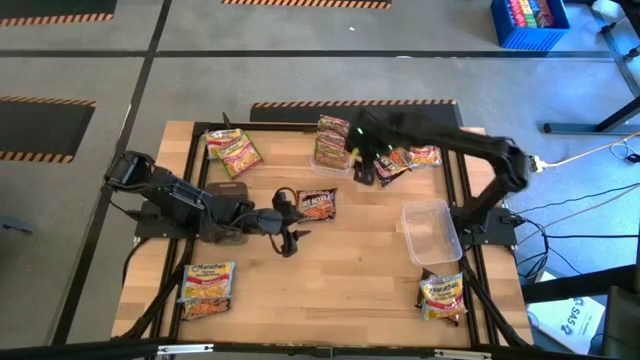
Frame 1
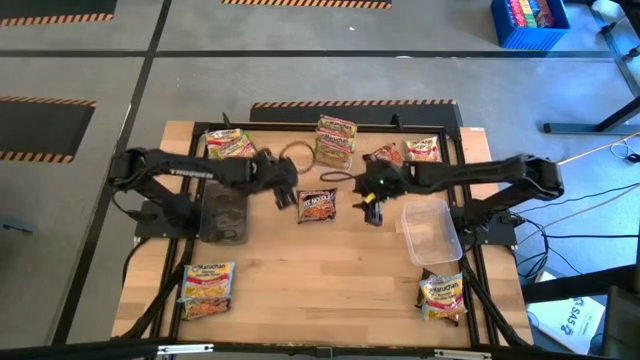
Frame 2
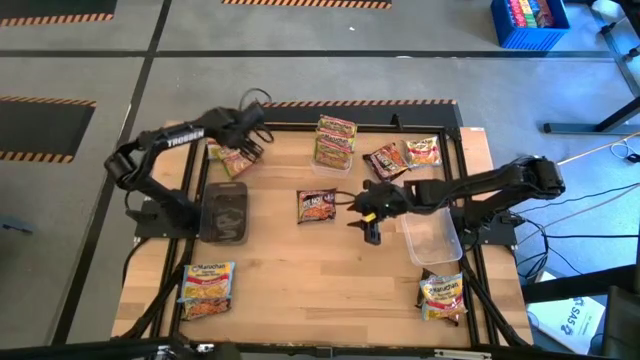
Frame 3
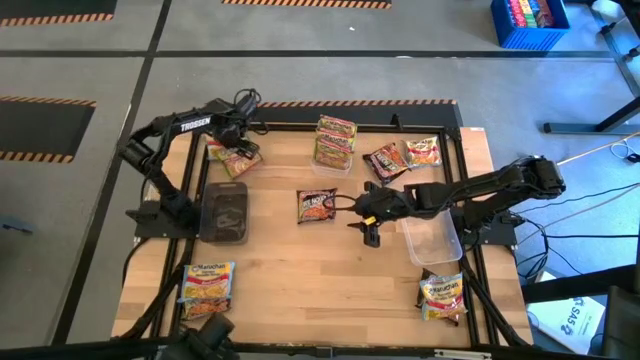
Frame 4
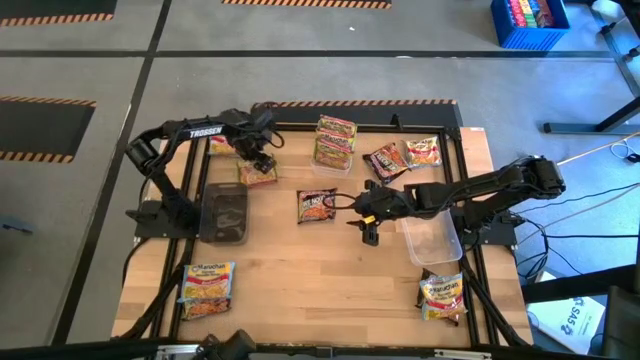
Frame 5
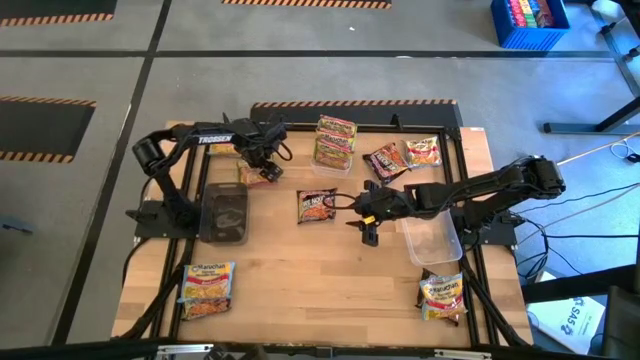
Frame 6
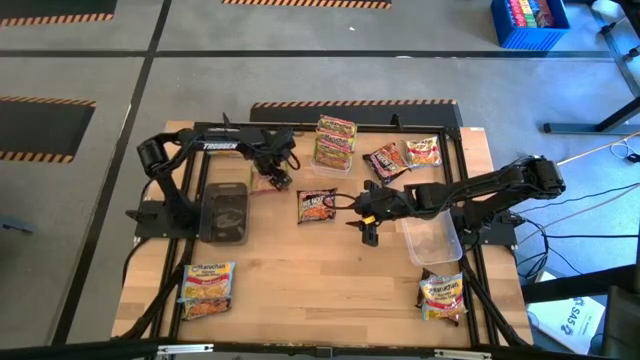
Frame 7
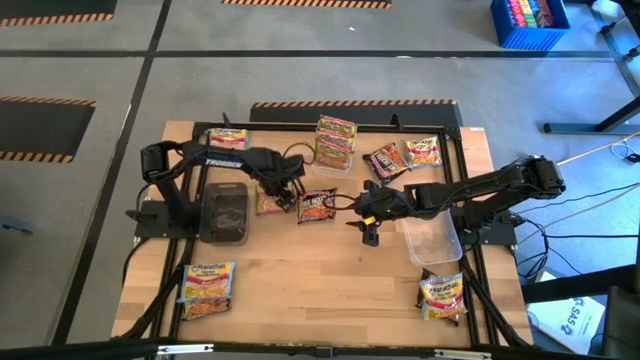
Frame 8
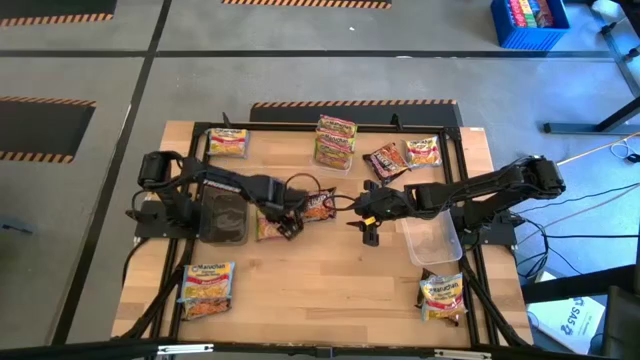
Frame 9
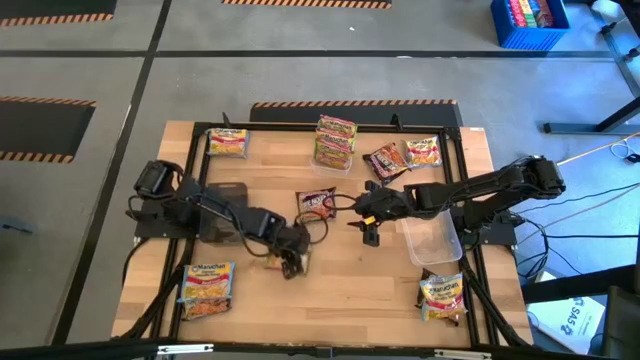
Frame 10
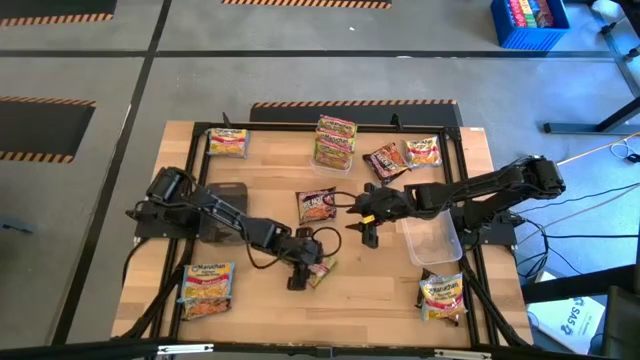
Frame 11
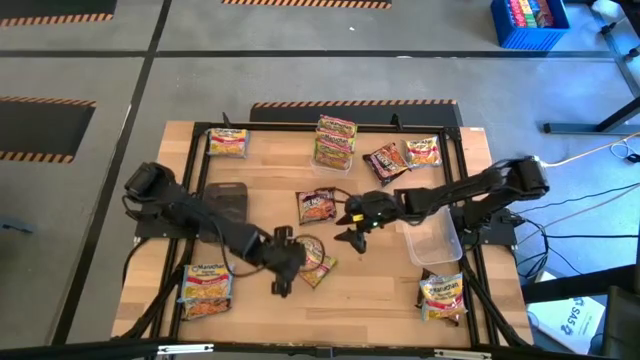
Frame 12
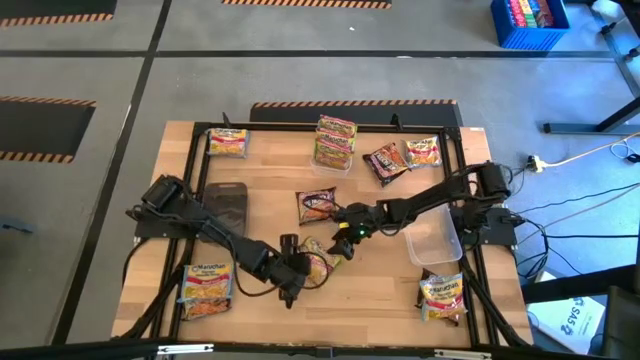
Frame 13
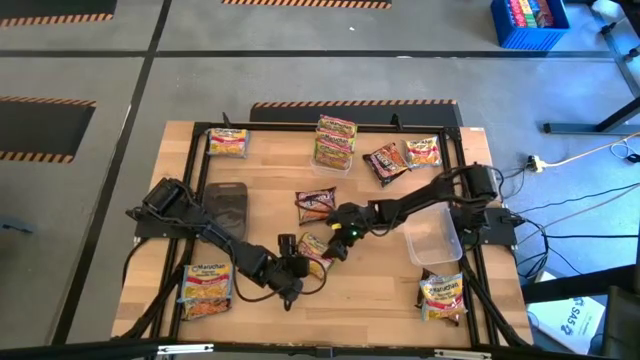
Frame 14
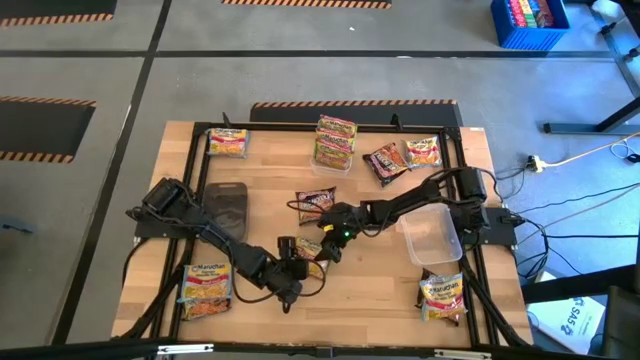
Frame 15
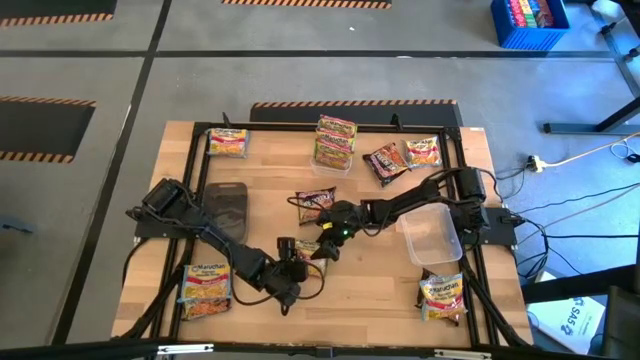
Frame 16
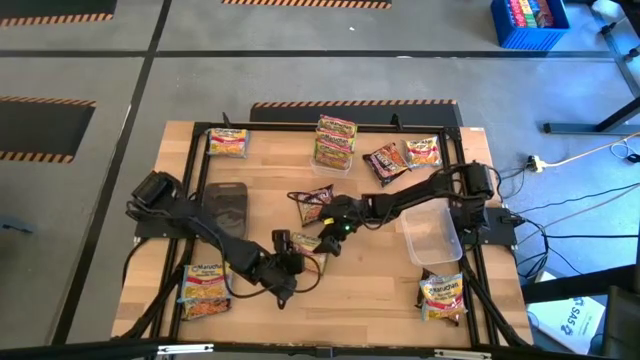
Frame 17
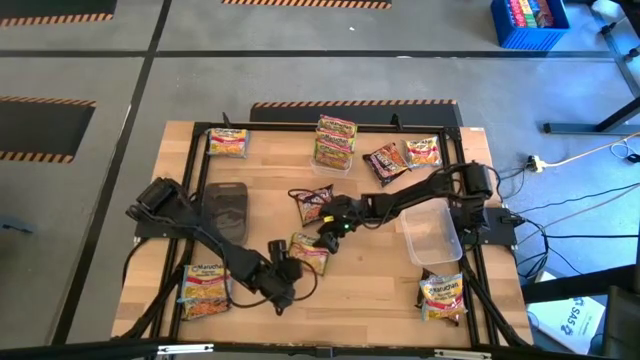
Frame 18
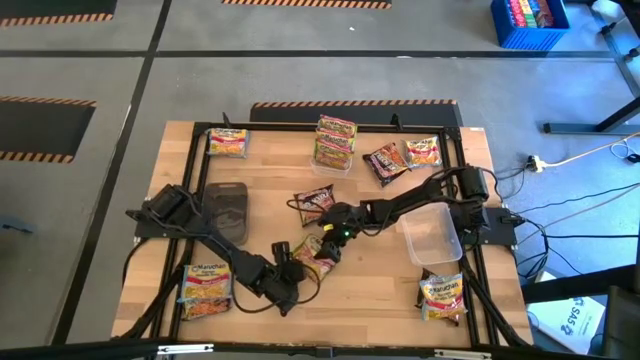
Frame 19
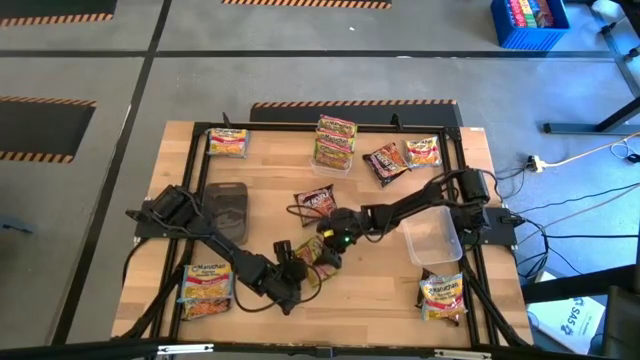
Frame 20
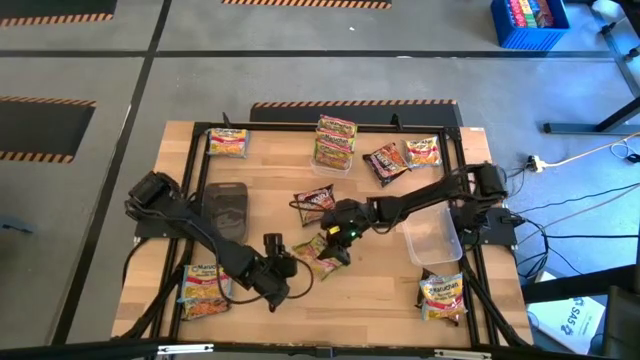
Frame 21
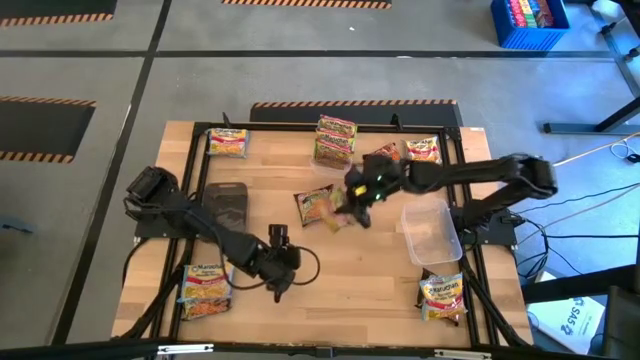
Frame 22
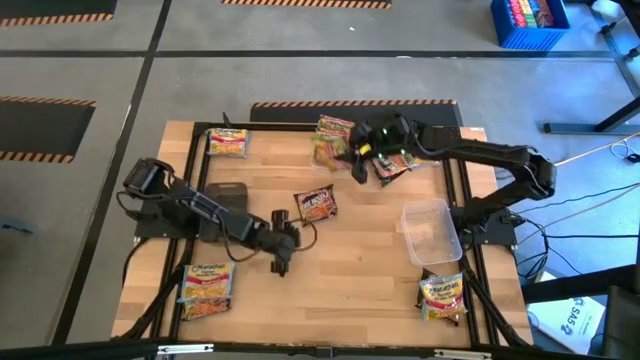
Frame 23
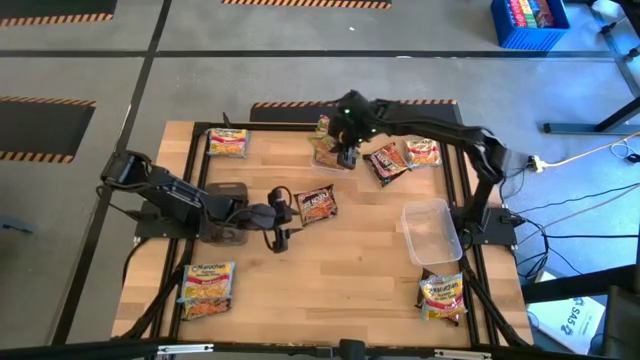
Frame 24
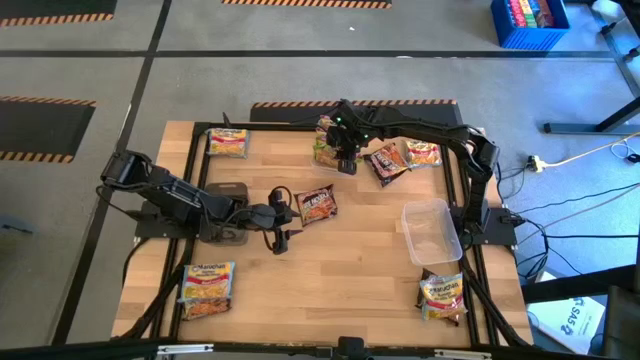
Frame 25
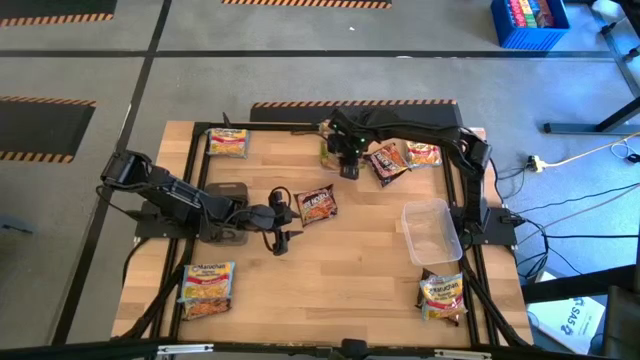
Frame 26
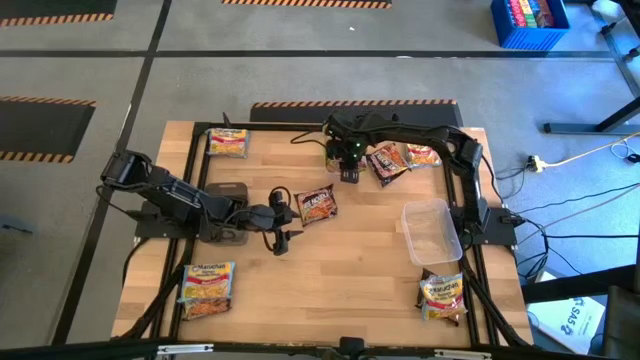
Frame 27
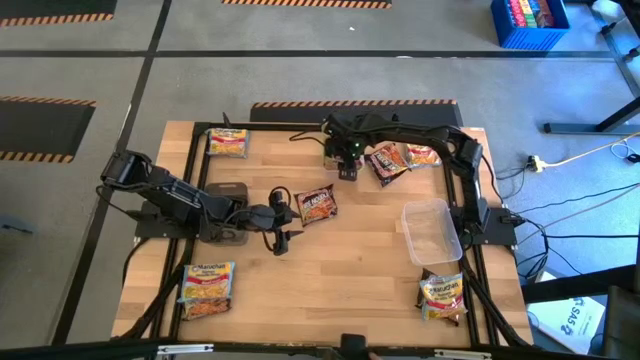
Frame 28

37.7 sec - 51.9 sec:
Task: Sort Maruchan noodles
Put the green noodle pack into the top transparent bin

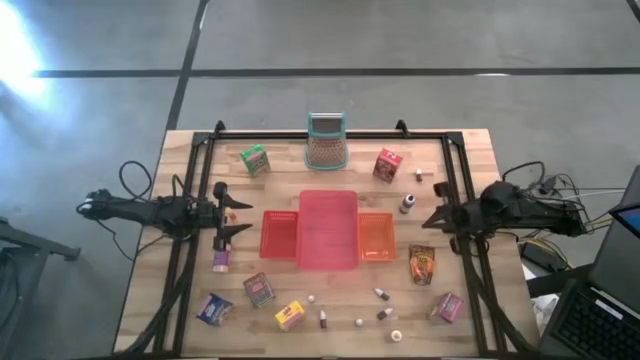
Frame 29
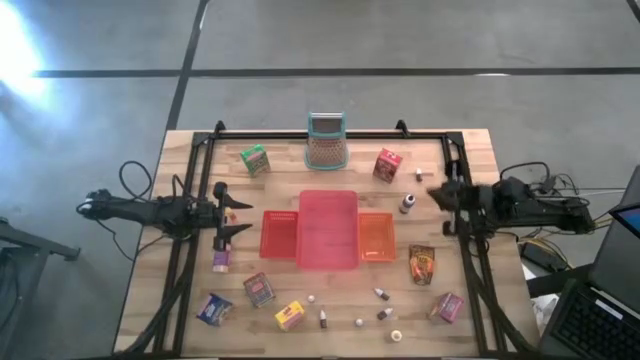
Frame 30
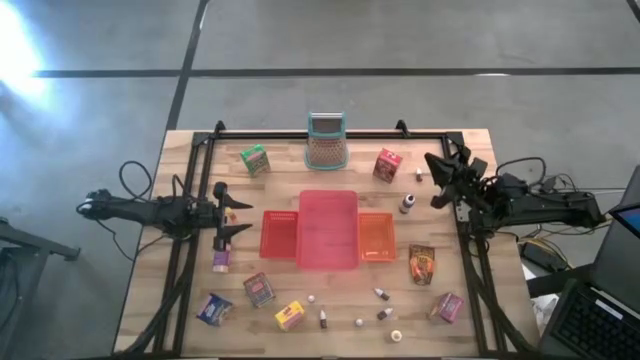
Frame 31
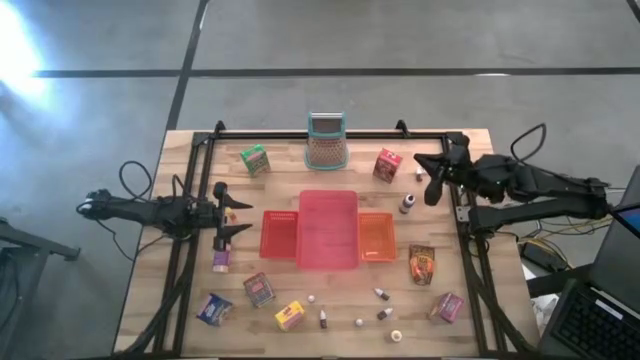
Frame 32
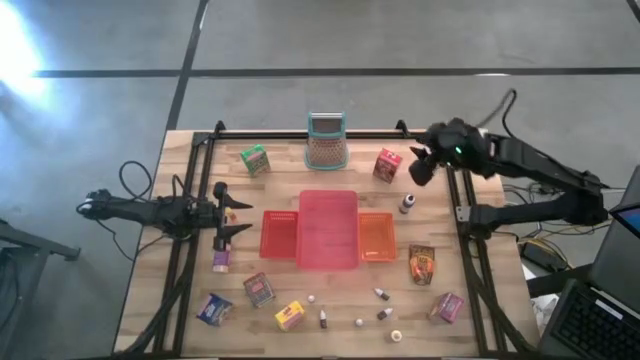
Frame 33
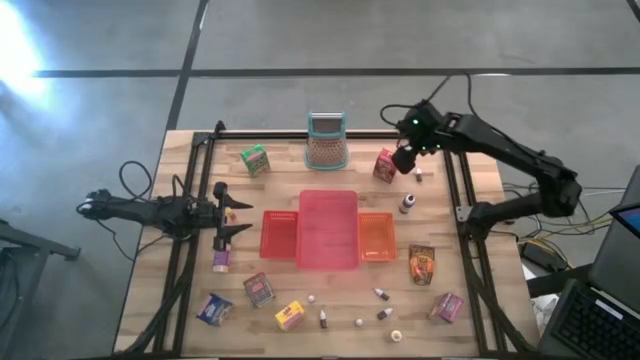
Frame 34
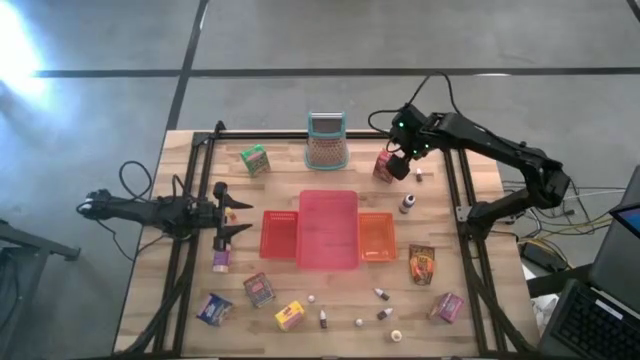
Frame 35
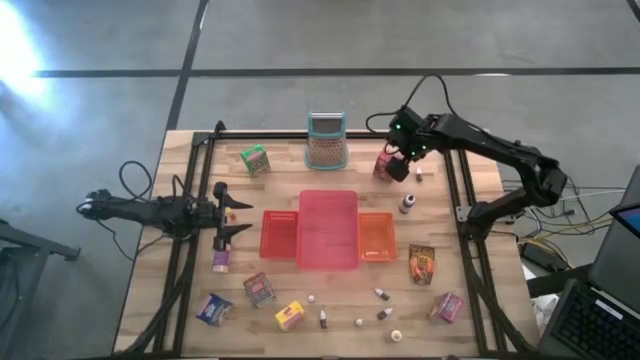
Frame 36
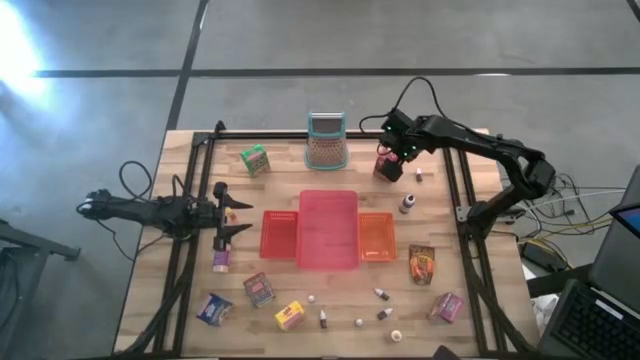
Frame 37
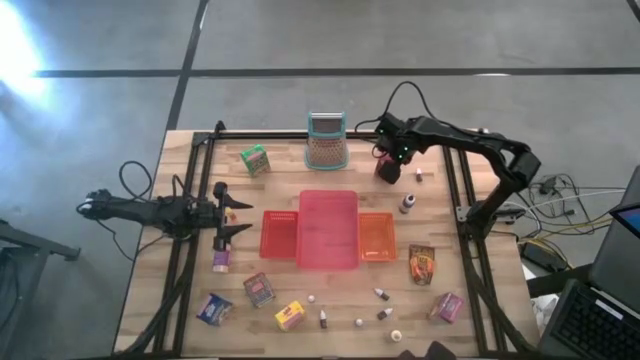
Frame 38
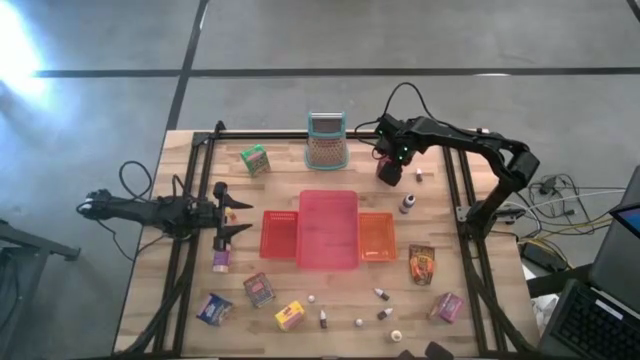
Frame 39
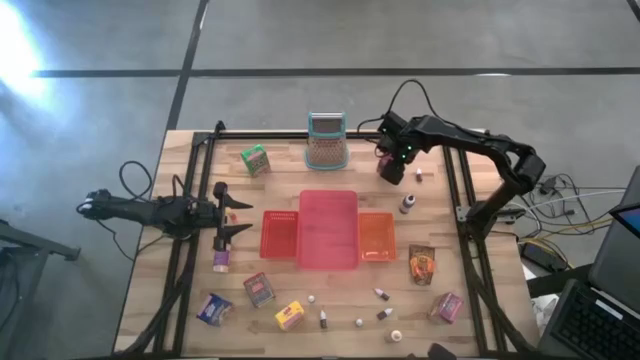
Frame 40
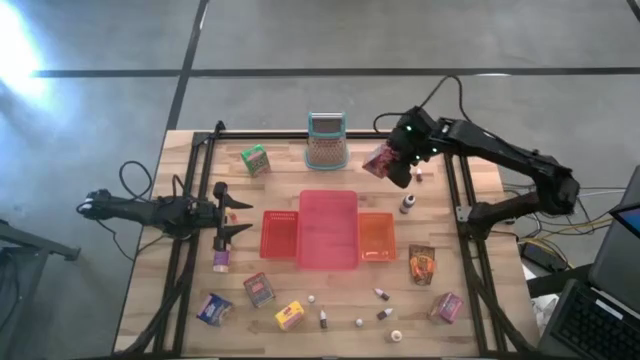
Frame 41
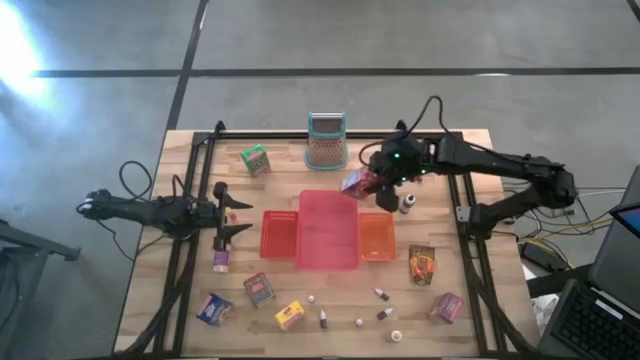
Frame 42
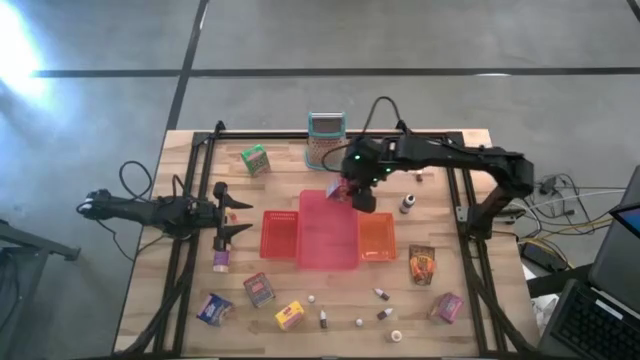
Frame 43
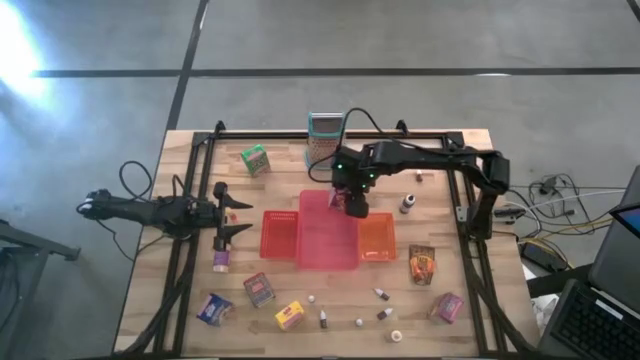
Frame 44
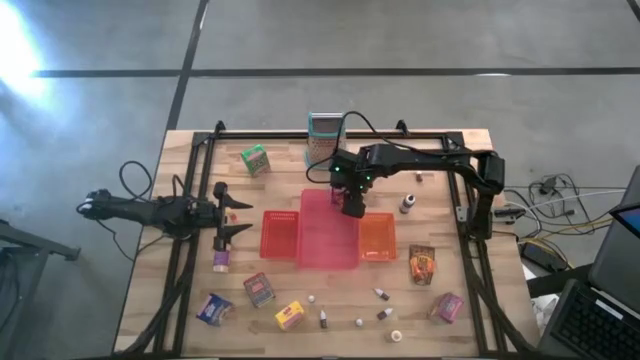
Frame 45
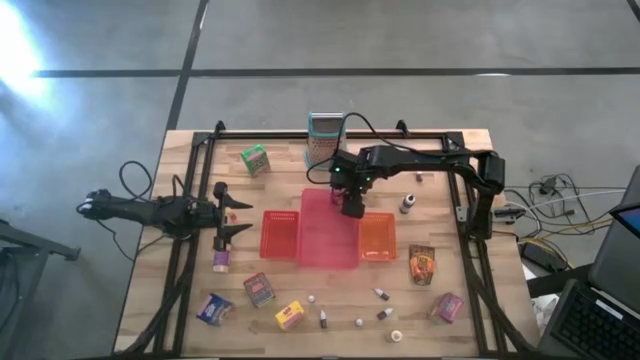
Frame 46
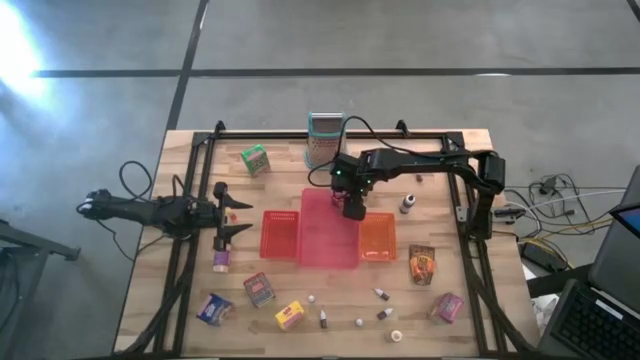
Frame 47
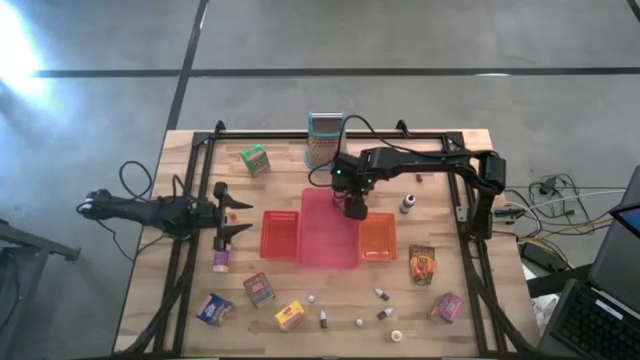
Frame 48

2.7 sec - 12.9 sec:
Task: Pick & Place Kitchen Items
Put the red cereal box into the pink bin
